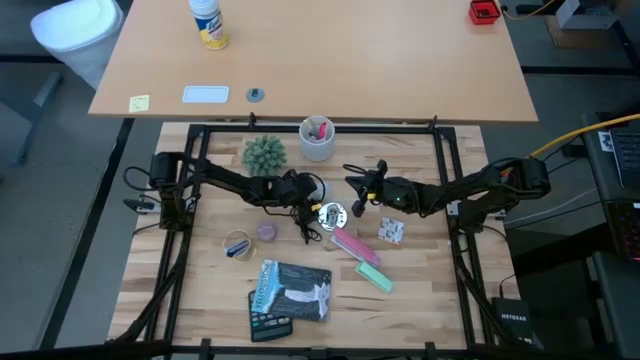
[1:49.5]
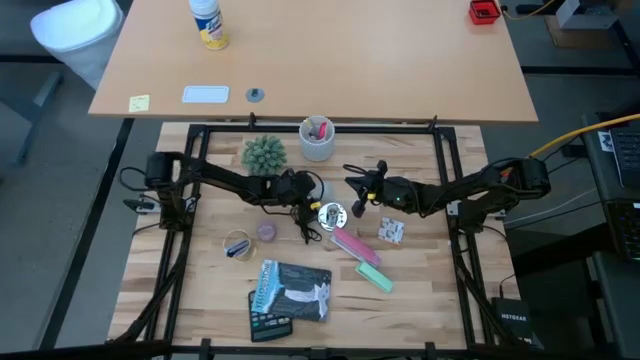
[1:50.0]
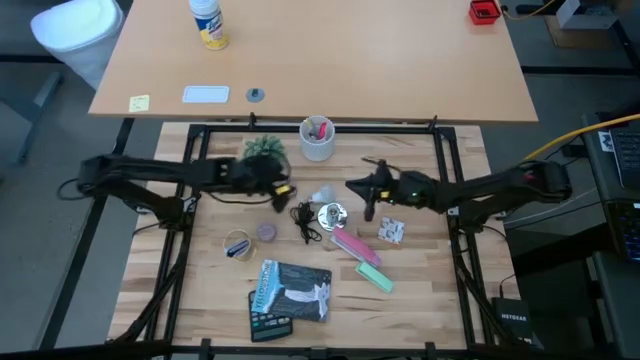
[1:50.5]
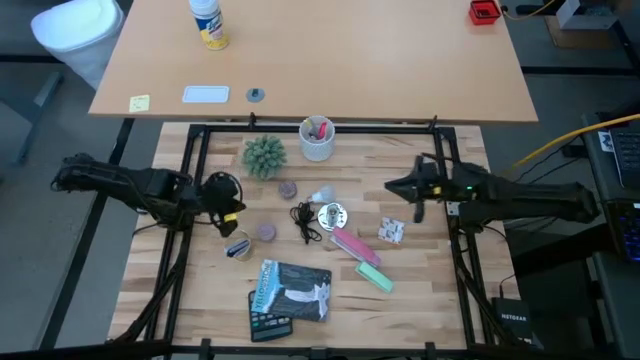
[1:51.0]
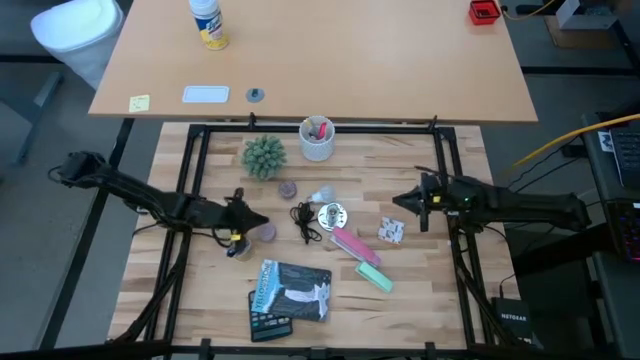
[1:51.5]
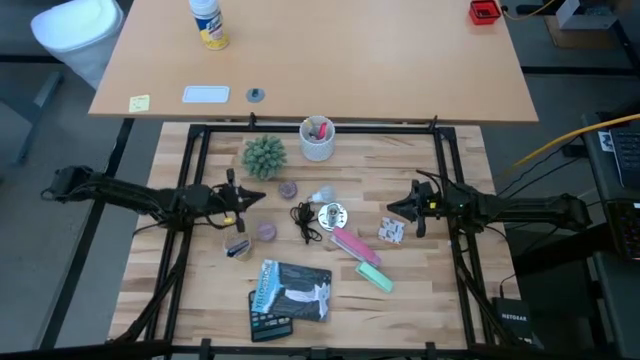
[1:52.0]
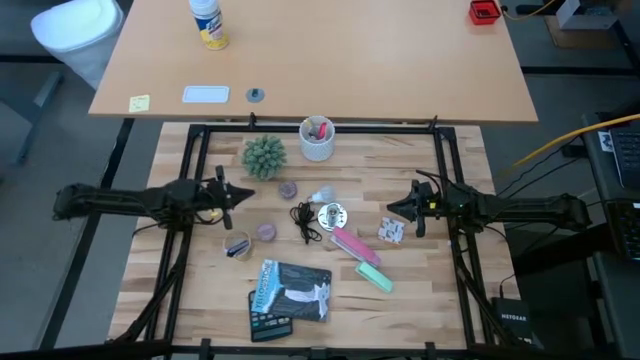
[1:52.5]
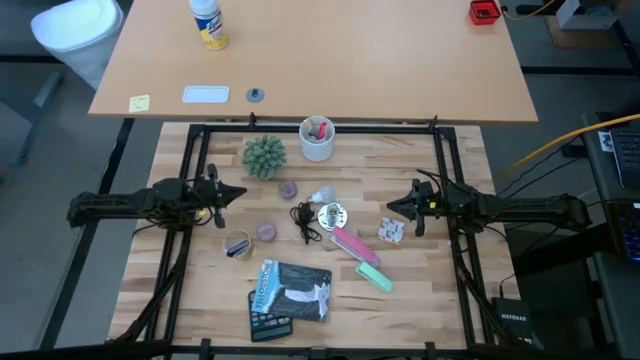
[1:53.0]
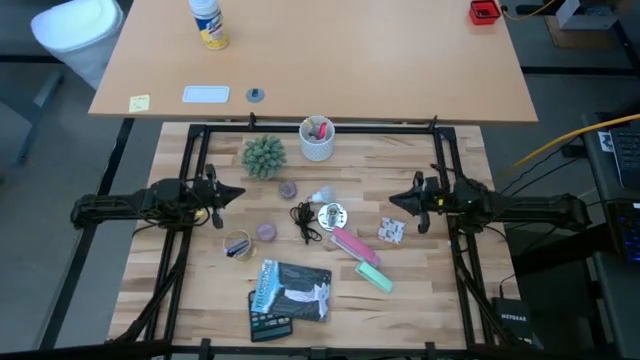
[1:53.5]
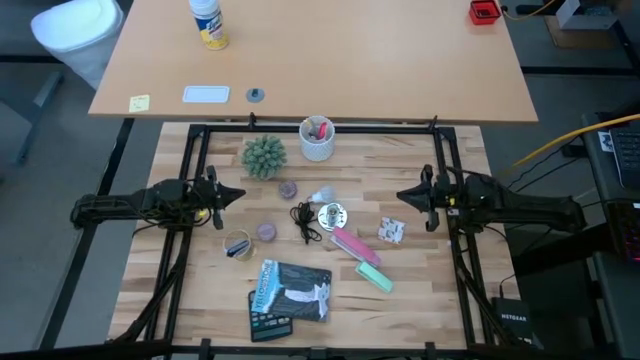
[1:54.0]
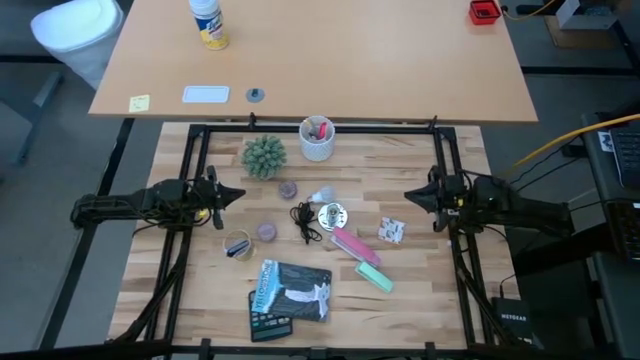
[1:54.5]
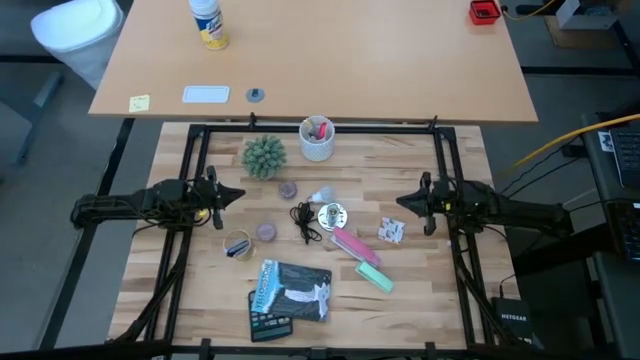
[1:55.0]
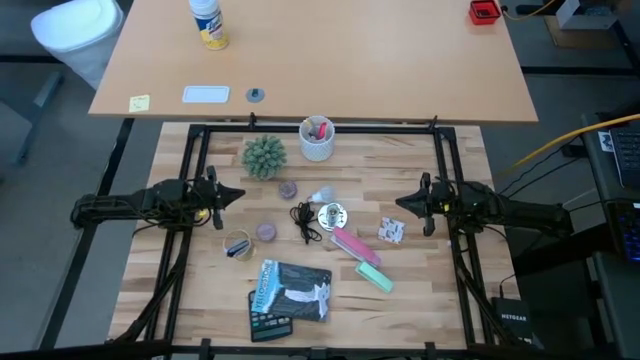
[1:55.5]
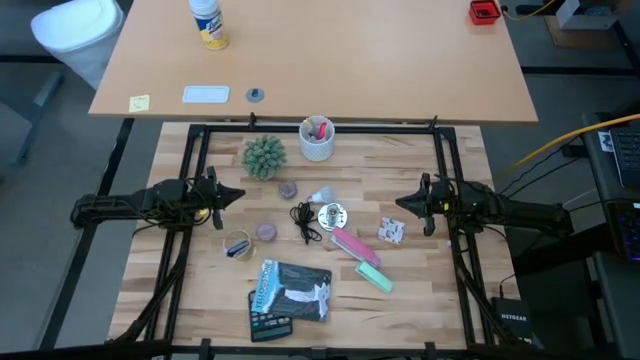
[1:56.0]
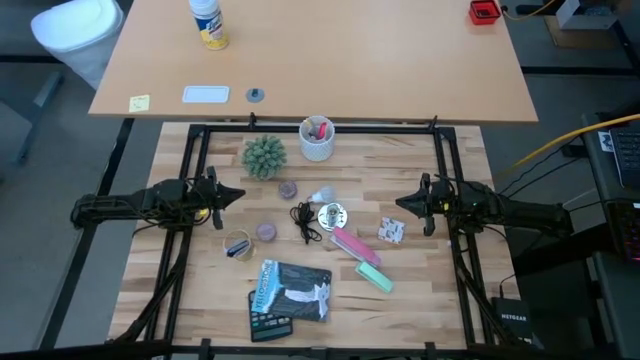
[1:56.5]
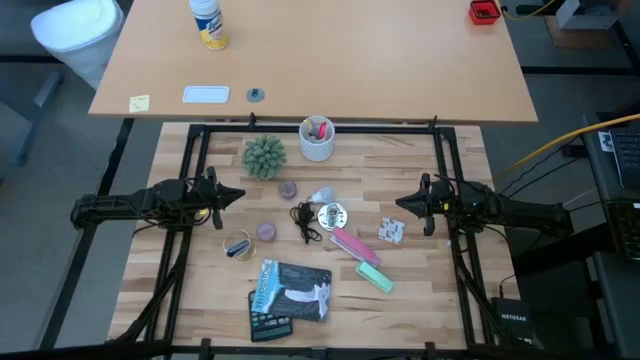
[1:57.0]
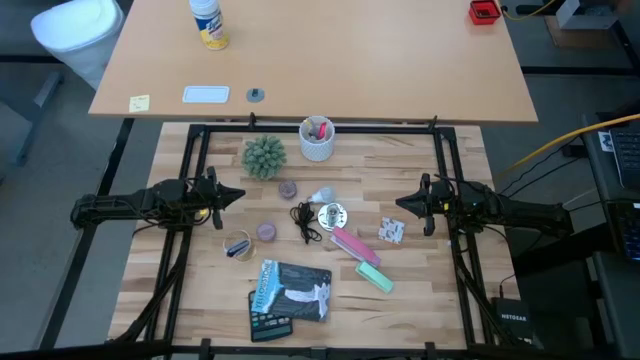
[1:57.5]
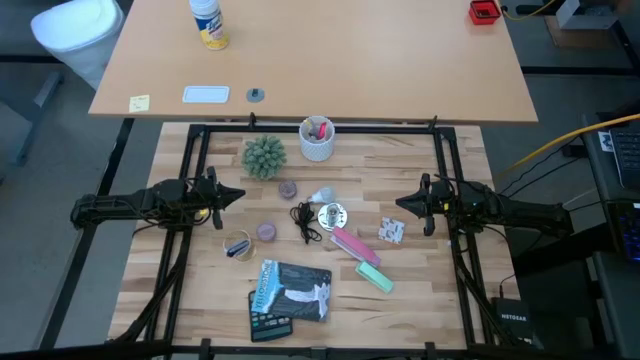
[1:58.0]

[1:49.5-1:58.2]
Task: Screw lightbulb
Return to Home Position

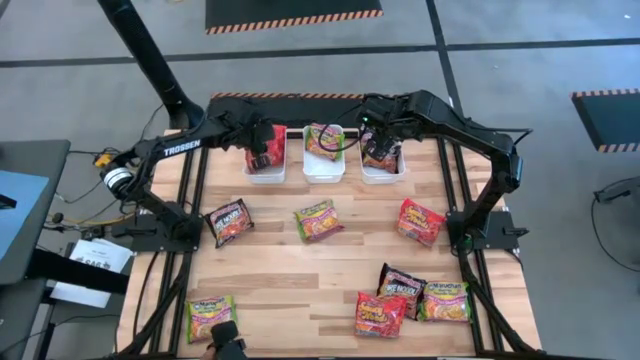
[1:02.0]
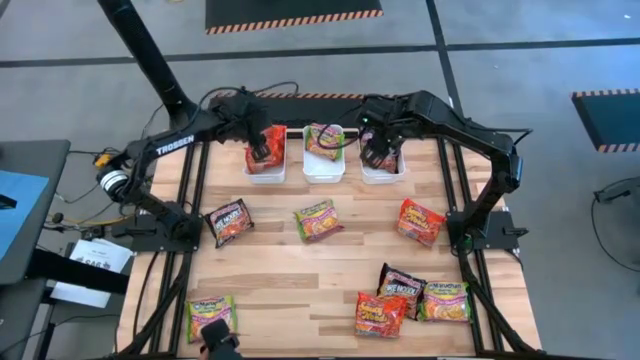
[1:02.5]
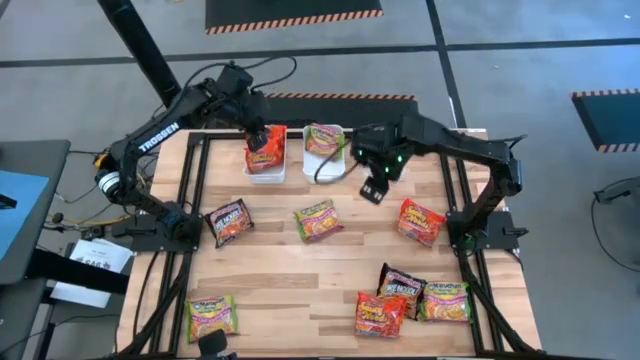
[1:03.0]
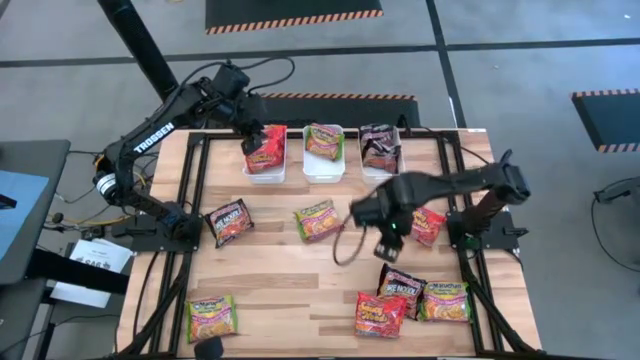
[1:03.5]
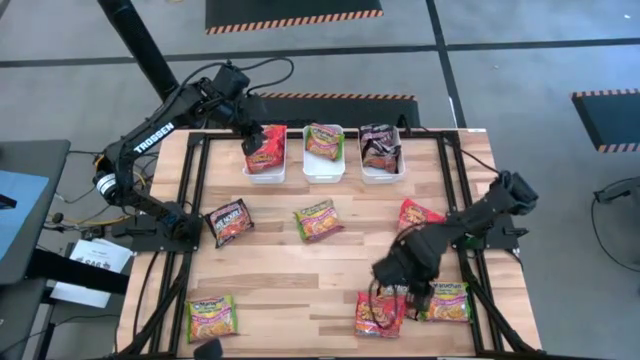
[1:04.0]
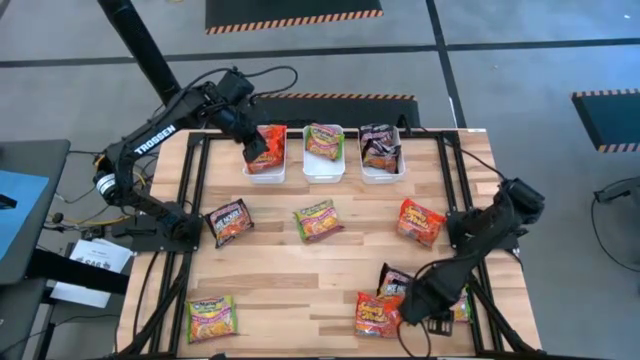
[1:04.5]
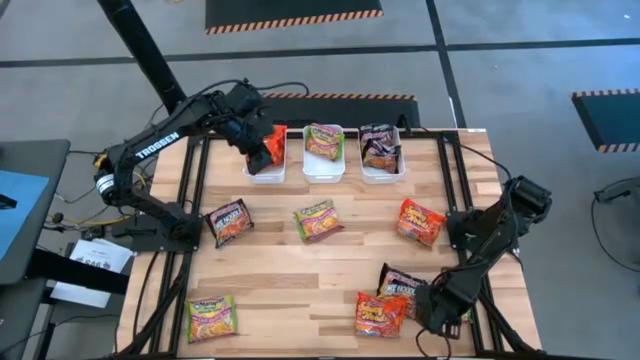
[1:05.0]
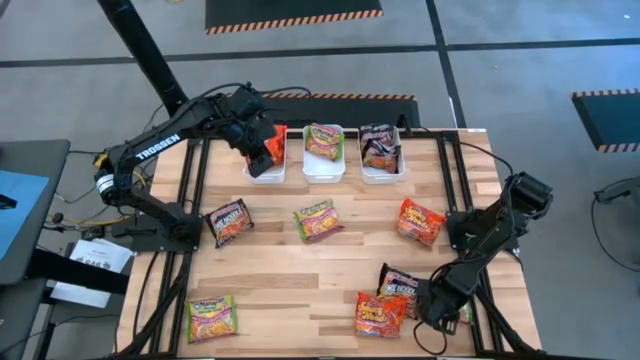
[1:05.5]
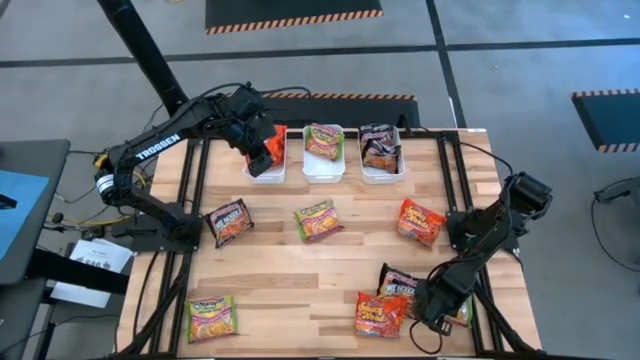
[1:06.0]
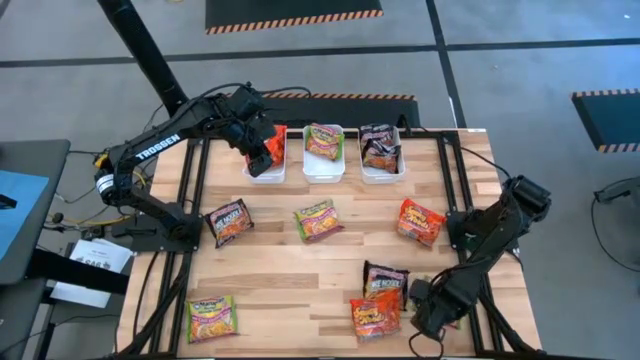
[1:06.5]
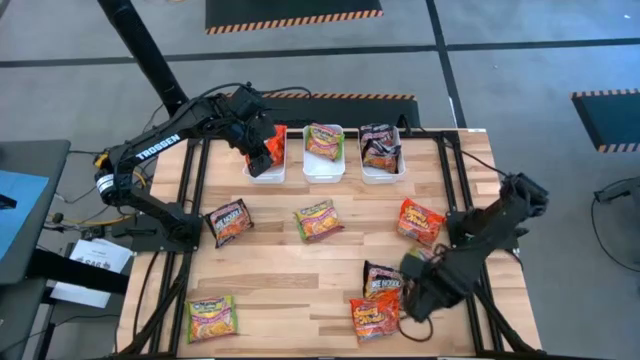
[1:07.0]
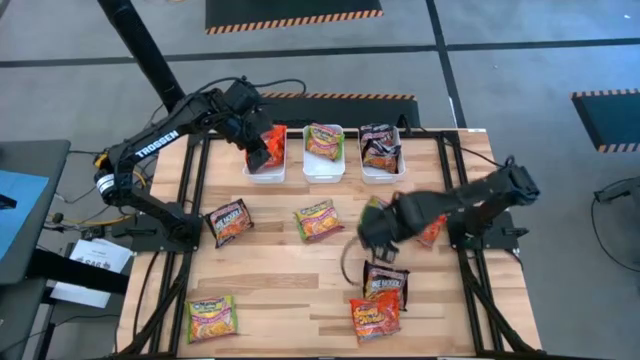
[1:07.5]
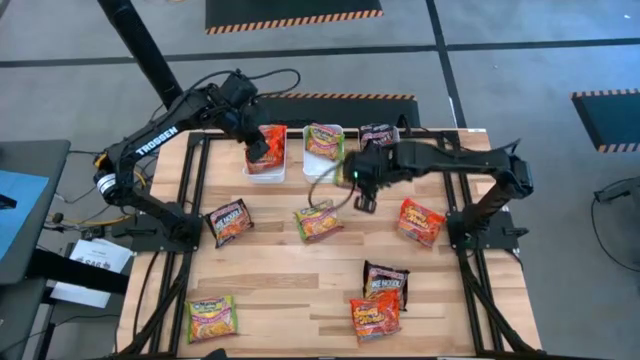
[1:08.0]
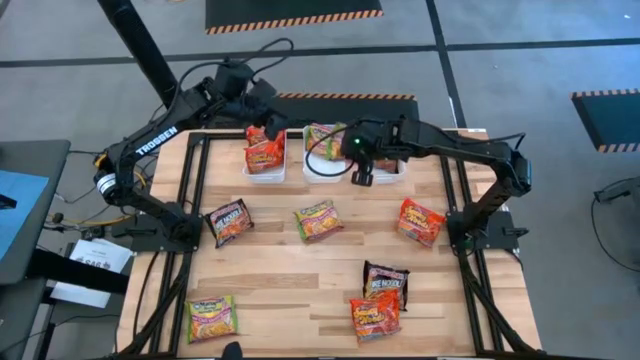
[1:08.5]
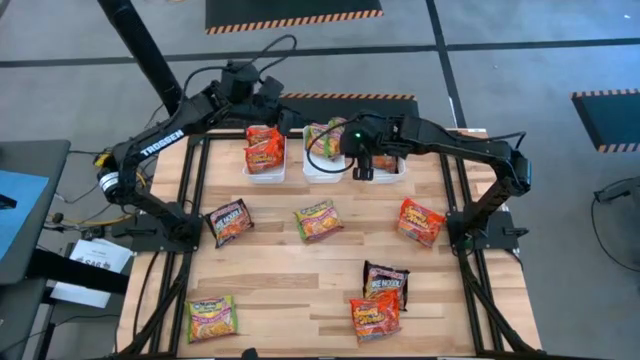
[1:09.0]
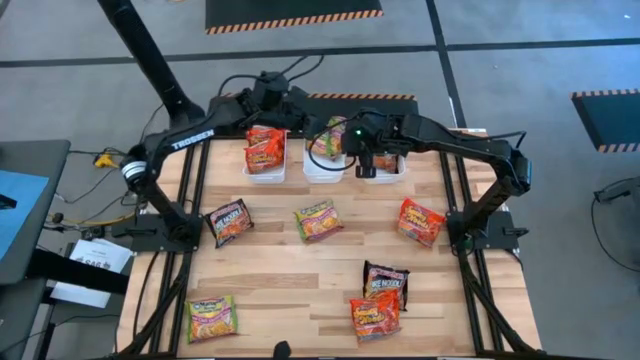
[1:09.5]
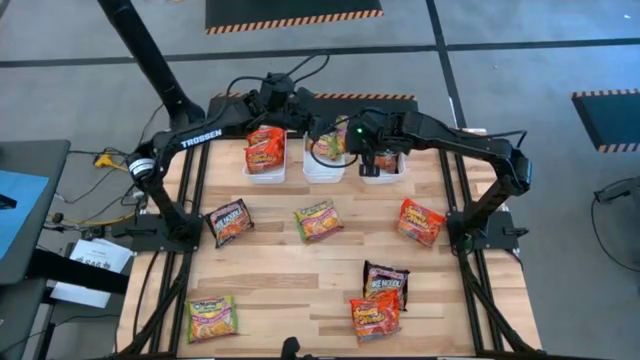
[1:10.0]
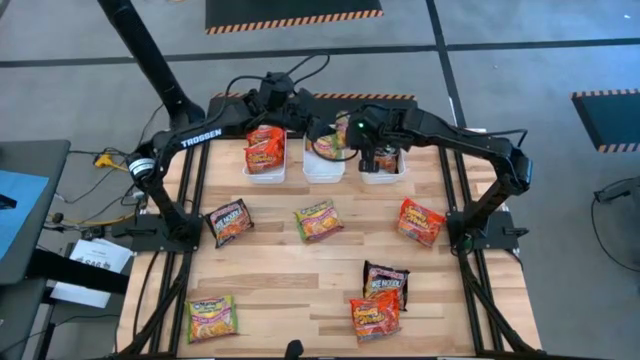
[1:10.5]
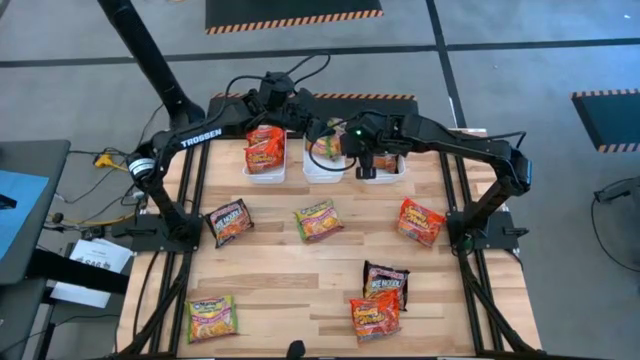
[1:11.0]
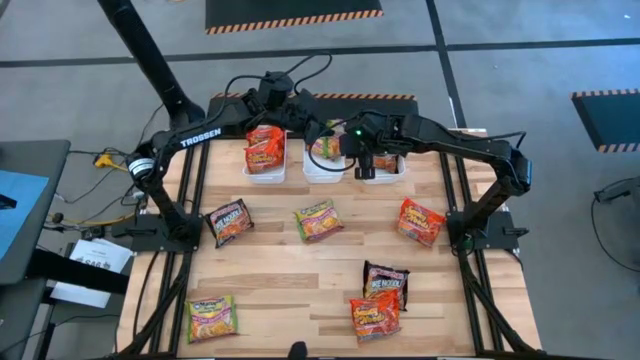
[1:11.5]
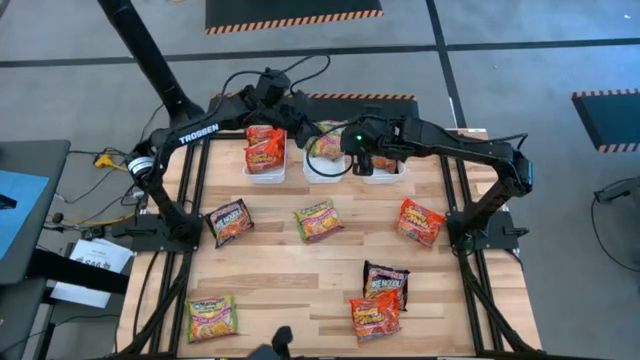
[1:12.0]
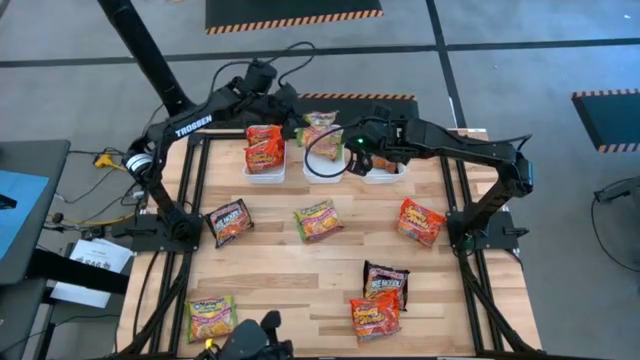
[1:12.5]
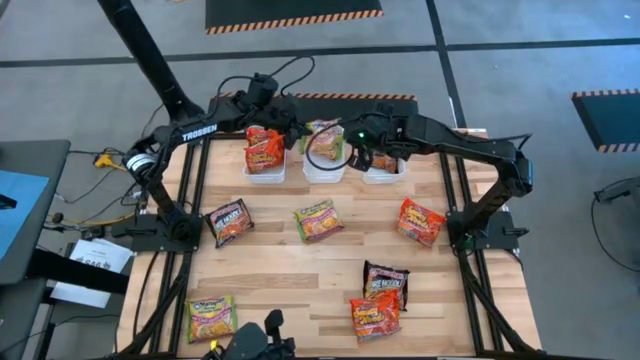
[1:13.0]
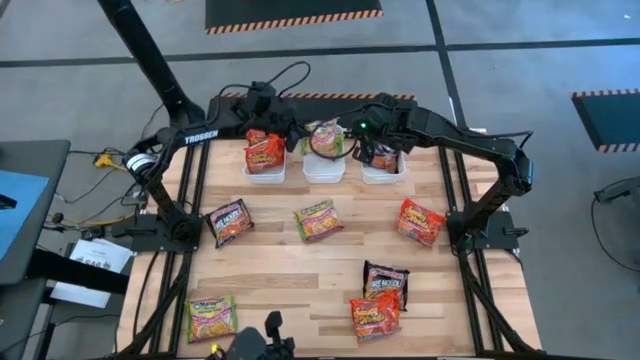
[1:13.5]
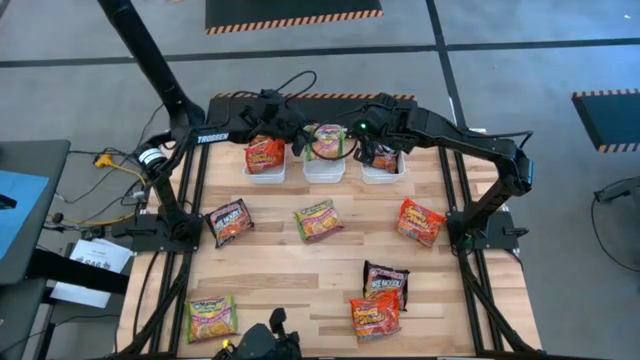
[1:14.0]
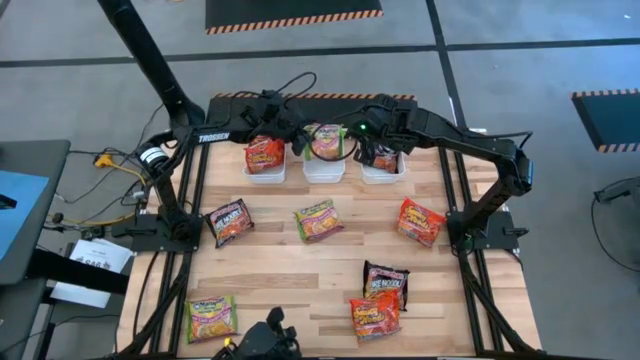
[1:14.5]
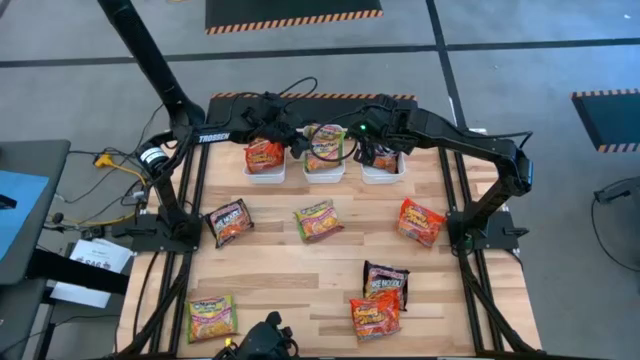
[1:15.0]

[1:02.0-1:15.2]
Task: Sort Maruchan noodles
Put the bottom right green noodle pack into the middle white bin
